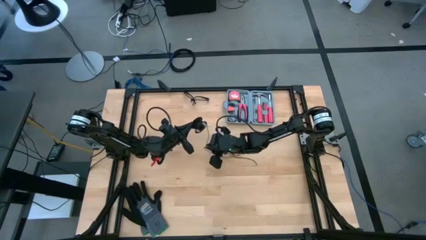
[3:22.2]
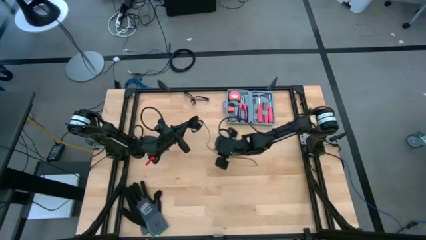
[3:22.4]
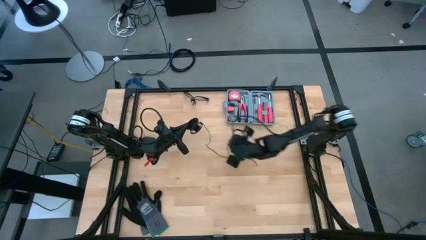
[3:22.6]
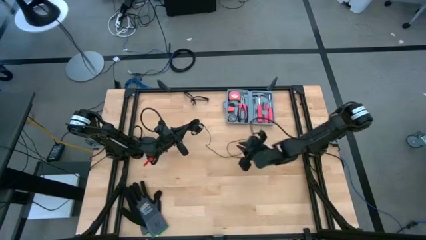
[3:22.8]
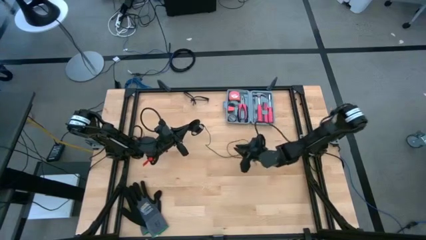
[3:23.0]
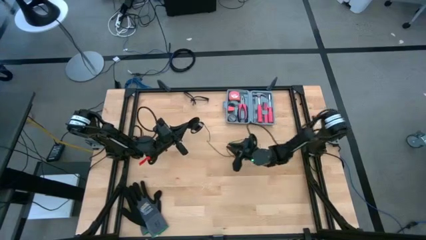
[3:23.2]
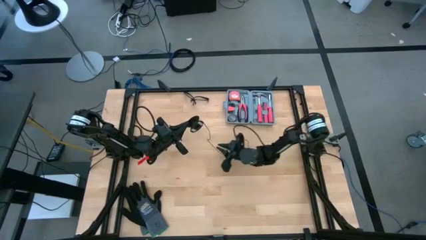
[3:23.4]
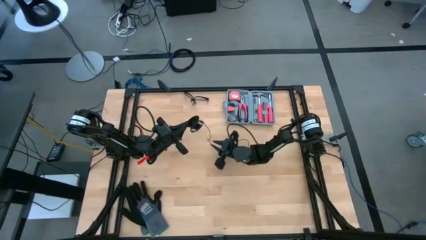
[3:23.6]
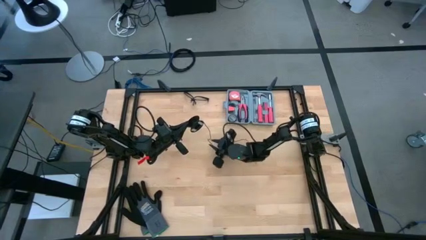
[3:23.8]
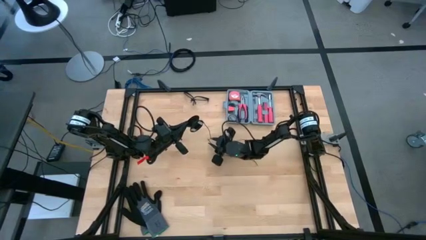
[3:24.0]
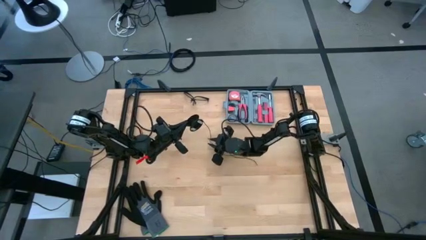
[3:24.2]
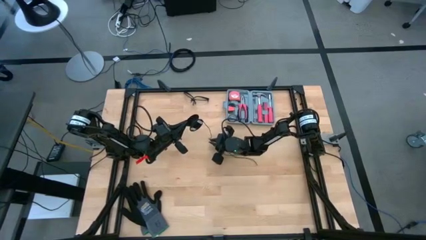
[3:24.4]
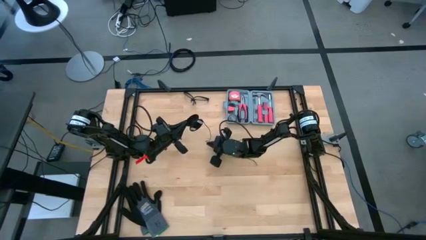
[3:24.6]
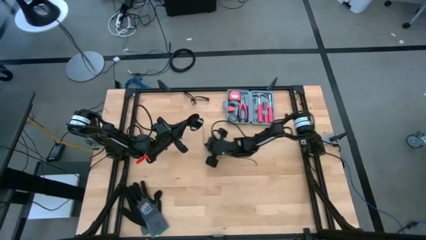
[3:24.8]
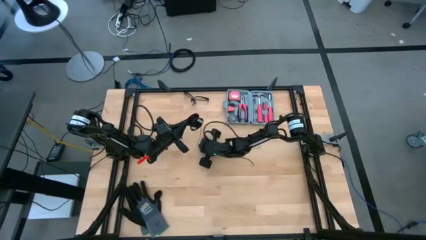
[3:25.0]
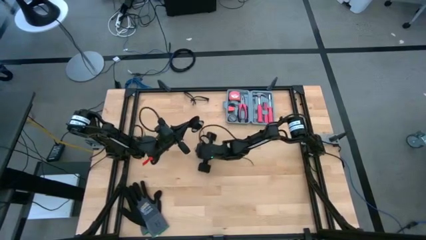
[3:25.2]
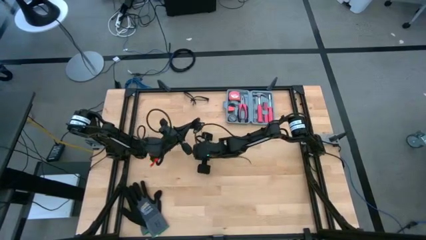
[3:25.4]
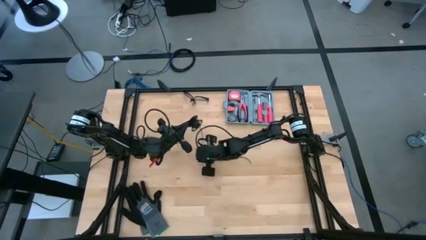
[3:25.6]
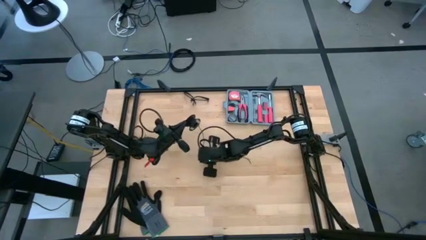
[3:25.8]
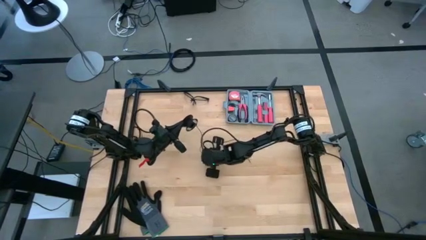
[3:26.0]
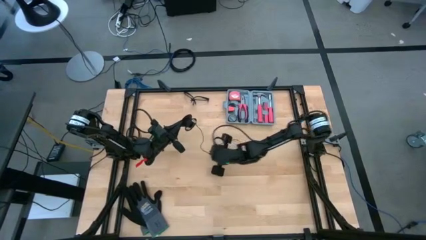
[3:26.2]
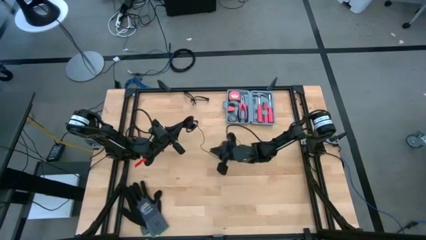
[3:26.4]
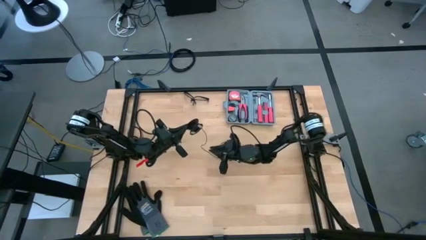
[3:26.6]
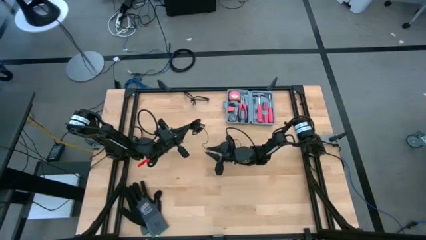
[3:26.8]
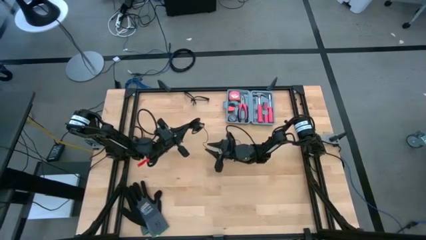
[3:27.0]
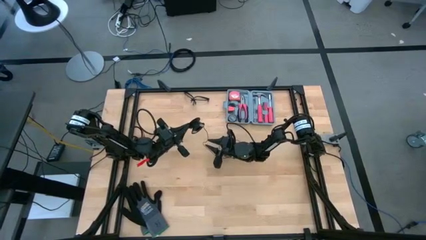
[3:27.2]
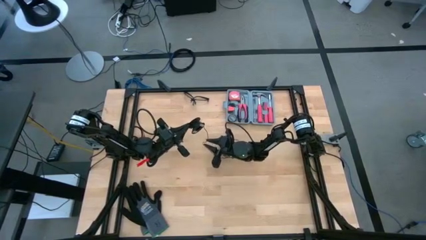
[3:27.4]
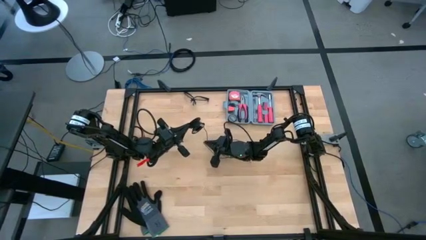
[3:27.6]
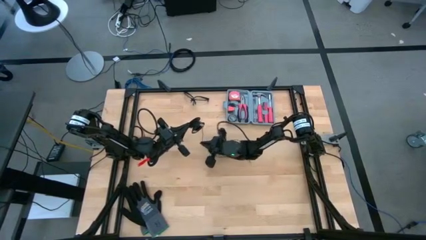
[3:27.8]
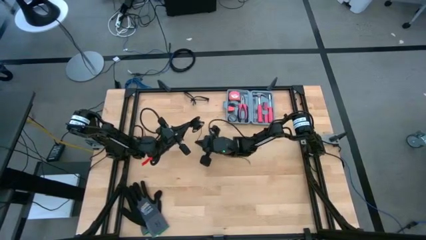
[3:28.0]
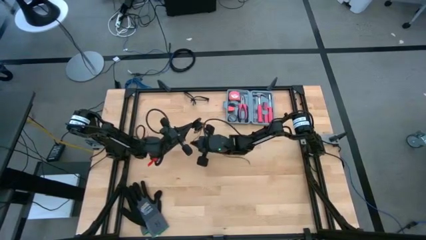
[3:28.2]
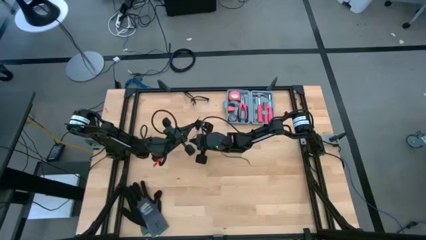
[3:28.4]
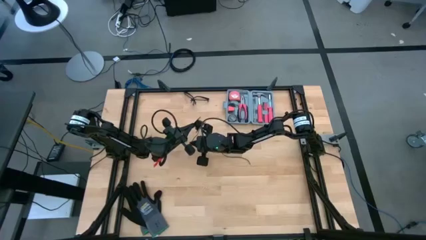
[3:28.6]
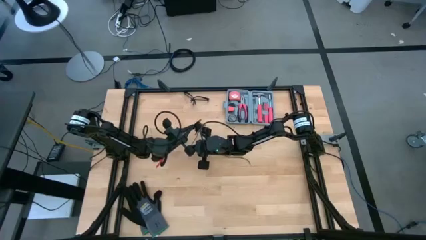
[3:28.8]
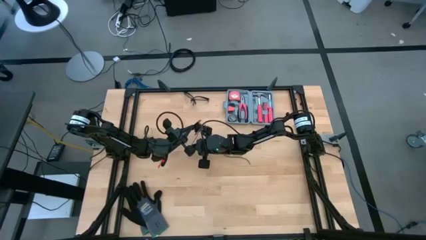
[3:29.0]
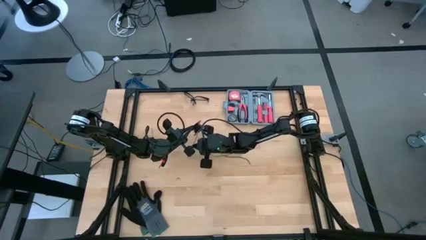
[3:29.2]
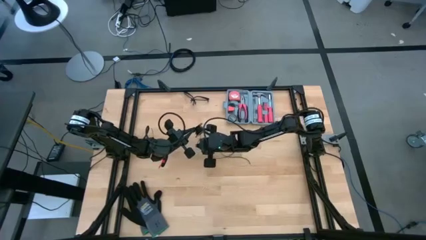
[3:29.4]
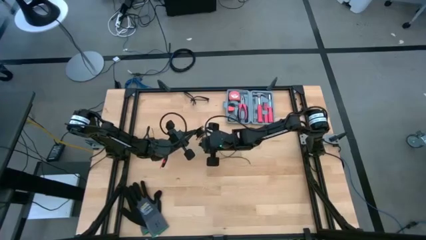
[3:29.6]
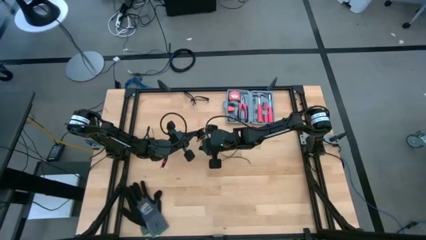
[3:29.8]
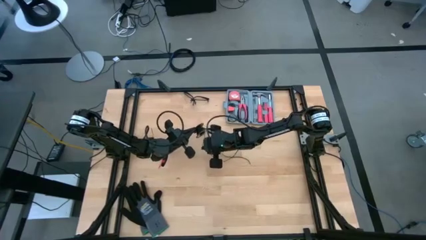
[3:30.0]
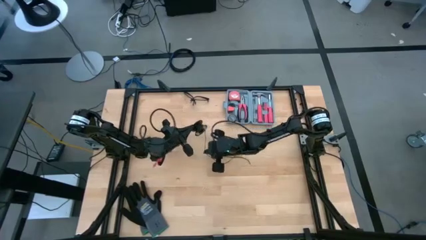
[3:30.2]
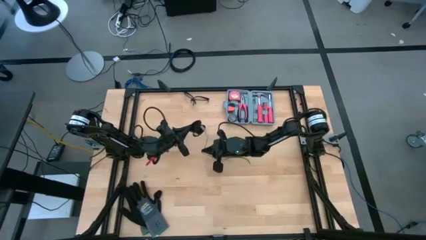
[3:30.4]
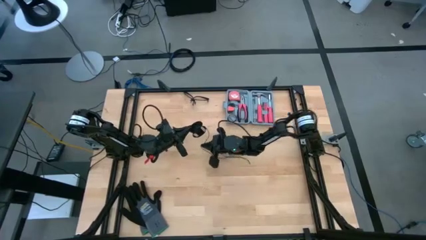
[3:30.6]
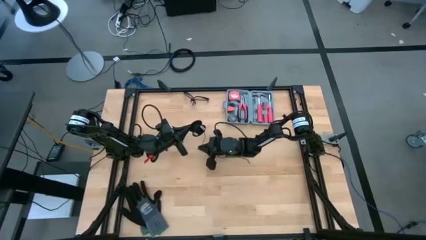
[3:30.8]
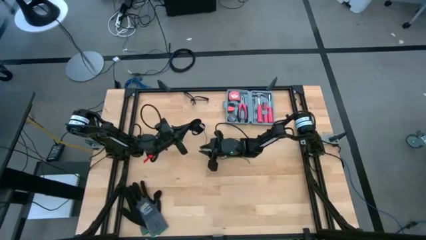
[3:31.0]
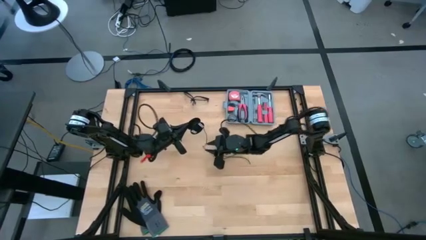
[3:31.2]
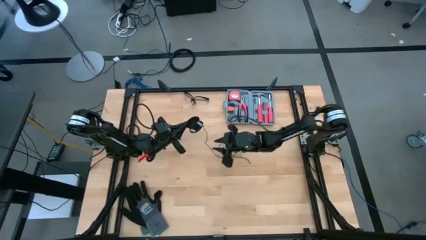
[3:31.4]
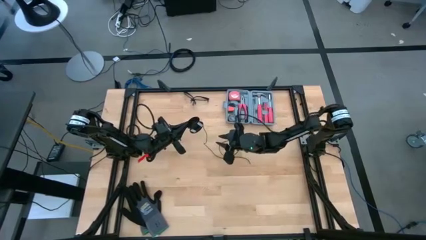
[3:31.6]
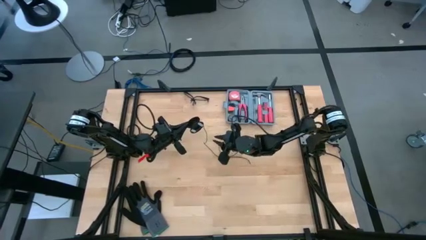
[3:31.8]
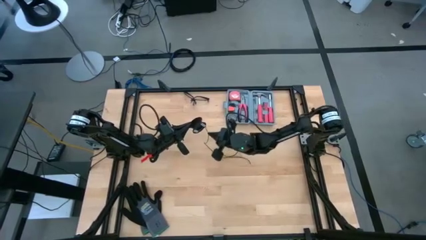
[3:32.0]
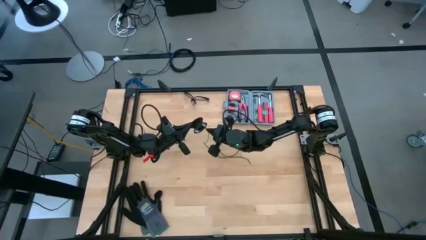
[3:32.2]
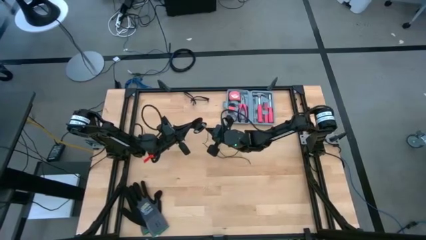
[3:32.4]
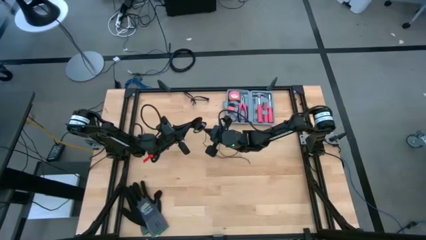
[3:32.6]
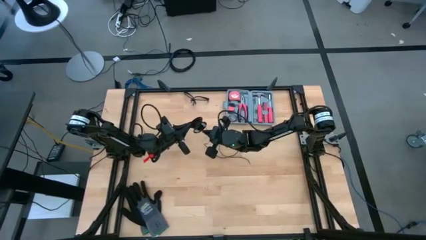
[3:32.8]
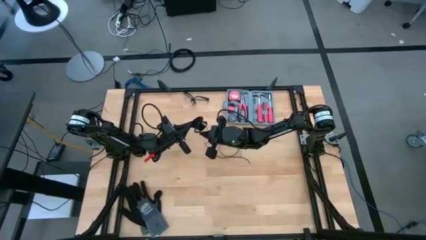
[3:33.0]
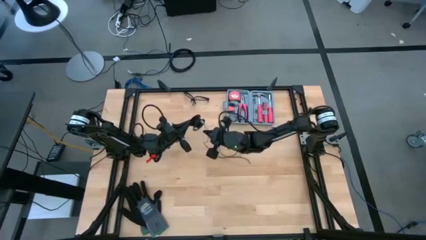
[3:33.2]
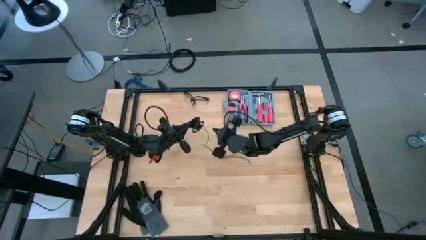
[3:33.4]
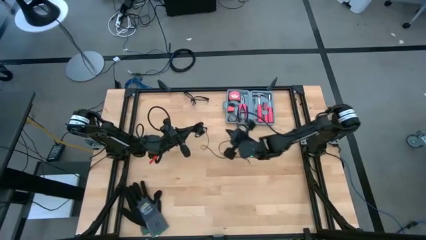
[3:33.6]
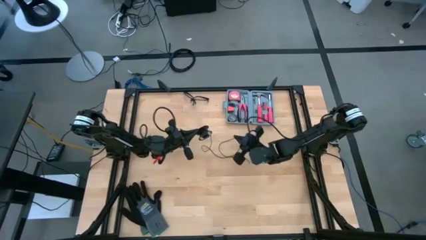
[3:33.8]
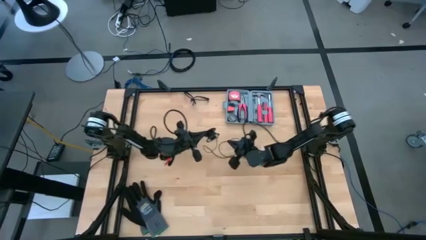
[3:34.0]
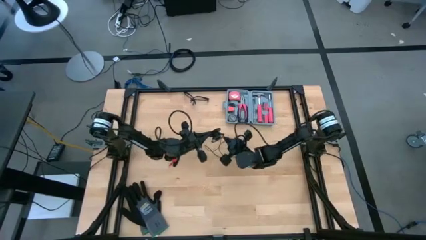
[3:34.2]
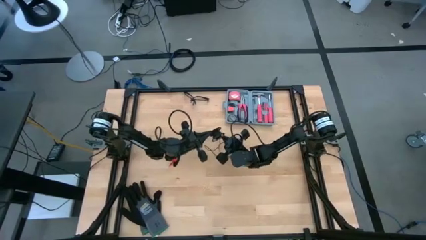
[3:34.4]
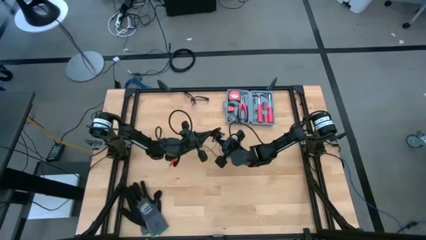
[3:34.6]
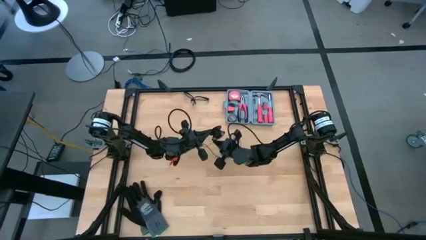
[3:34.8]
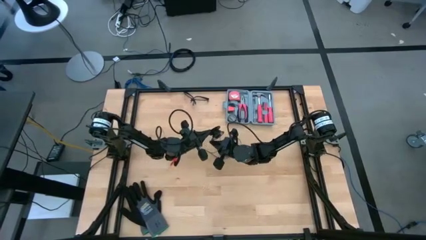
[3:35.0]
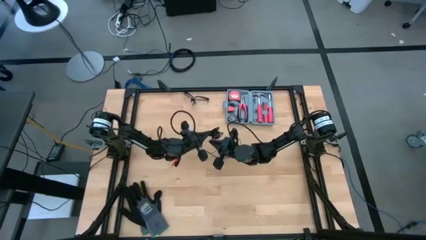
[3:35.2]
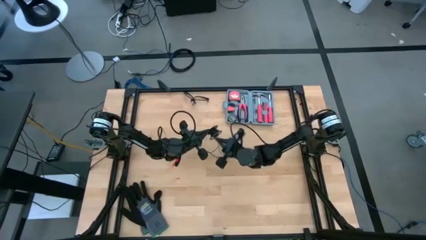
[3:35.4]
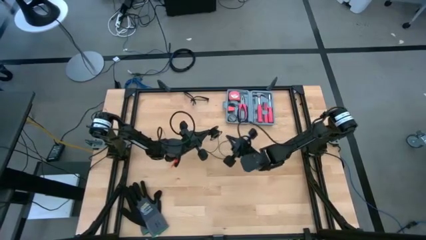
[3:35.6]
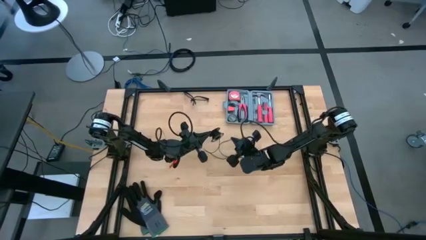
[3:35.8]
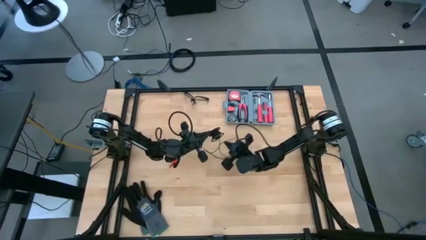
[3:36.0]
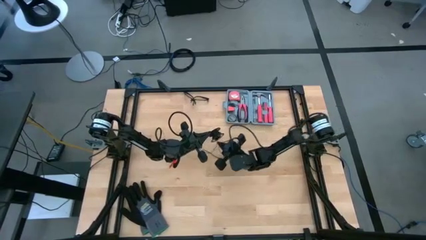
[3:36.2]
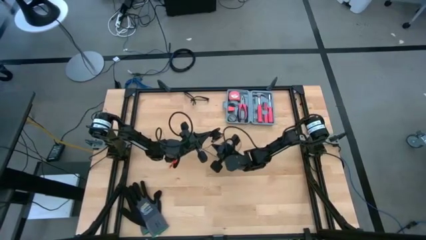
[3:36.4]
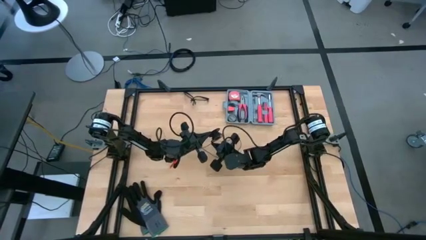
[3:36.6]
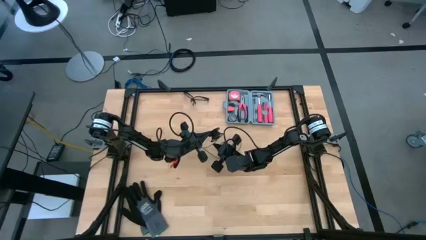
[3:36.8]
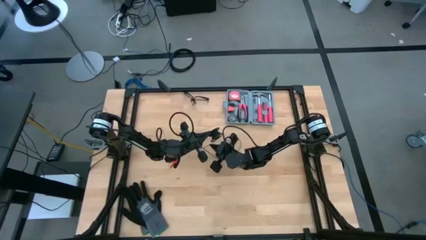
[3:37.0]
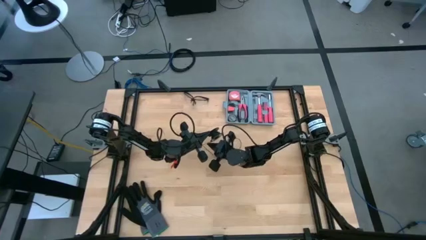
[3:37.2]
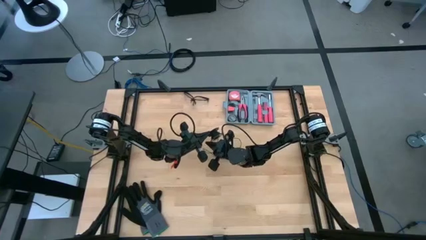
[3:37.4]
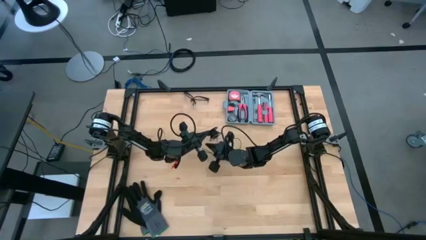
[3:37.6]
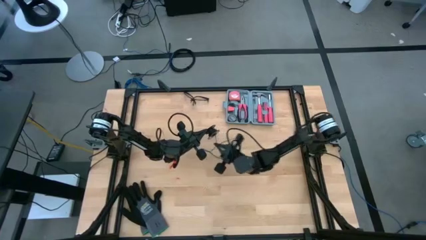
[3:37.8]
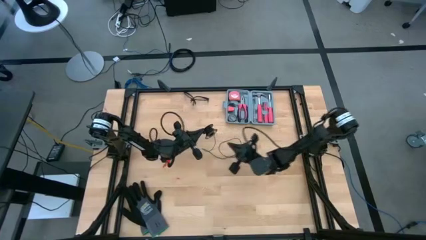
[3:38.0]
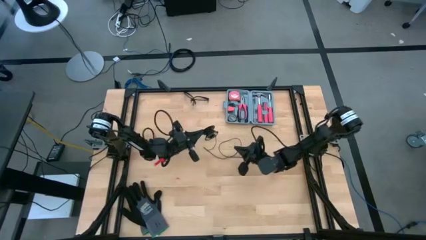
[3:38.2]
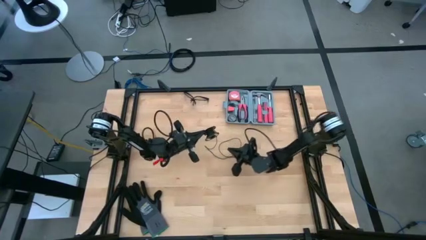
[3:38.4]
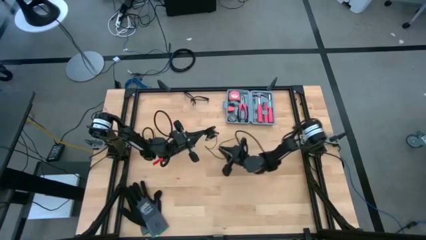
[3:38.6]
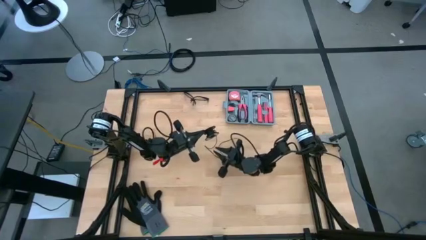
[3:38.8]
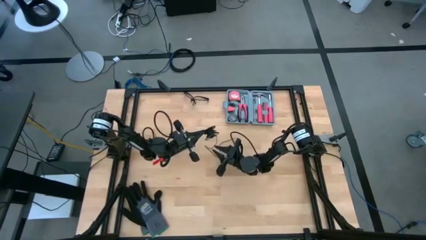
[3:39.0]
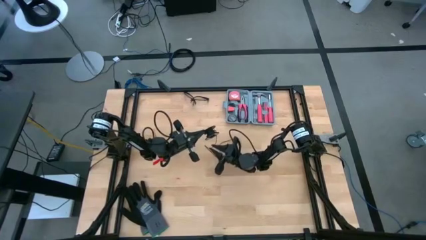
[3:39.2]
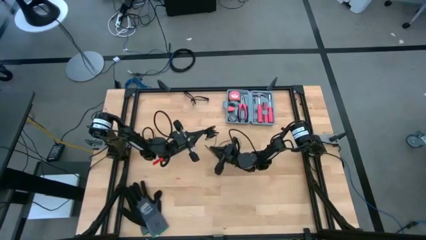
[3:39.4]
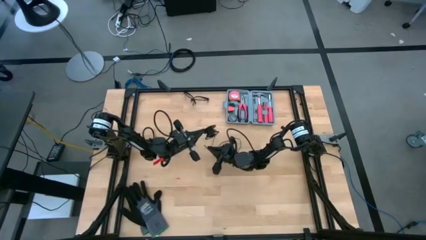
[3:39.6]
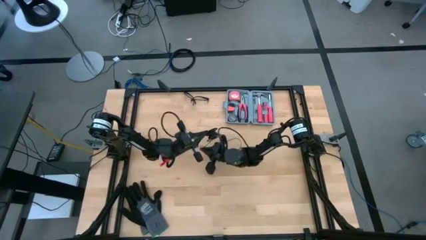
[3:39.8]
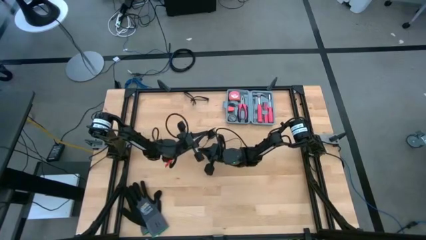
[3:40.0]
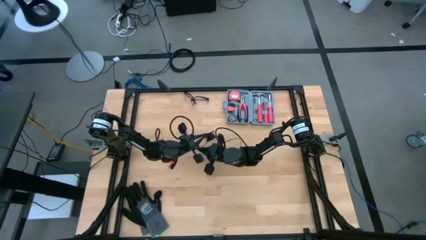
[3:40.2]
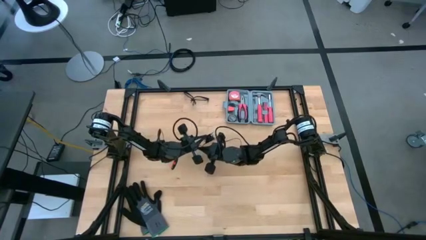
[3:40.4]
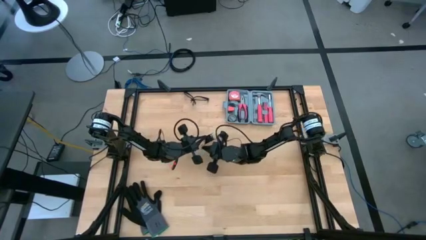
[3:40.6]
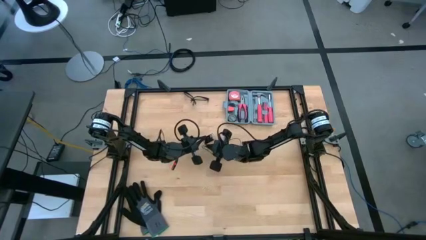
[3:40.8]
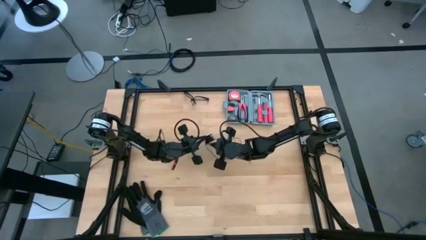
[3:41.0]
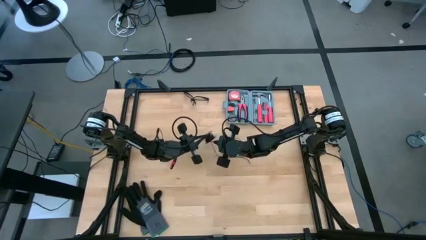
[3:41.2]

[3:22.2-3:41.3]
Task: Coil cords
Coil the black wire onto the spool
